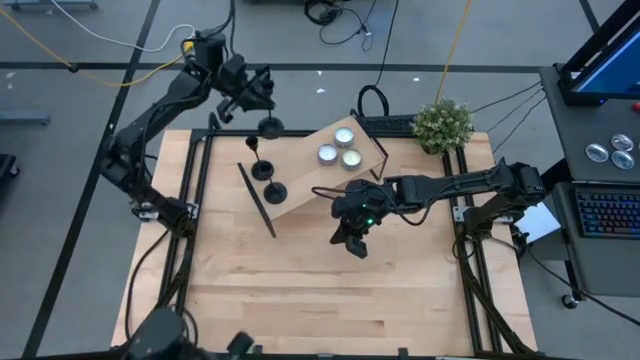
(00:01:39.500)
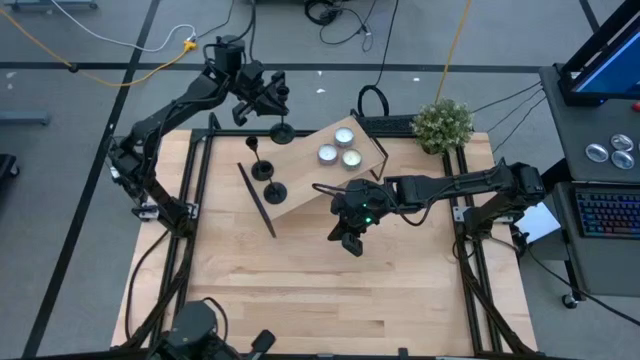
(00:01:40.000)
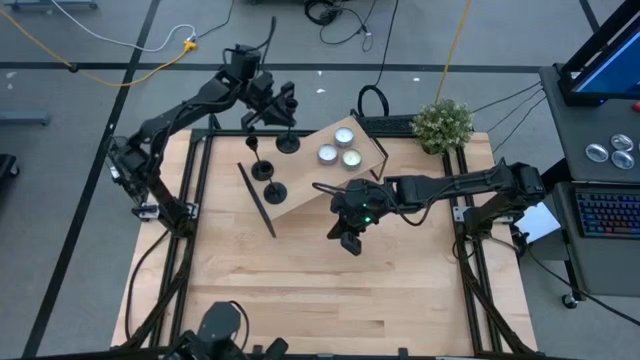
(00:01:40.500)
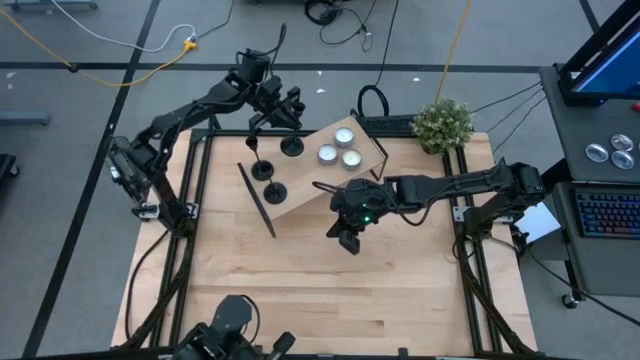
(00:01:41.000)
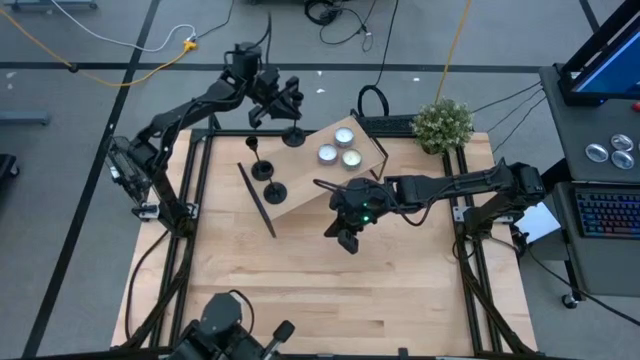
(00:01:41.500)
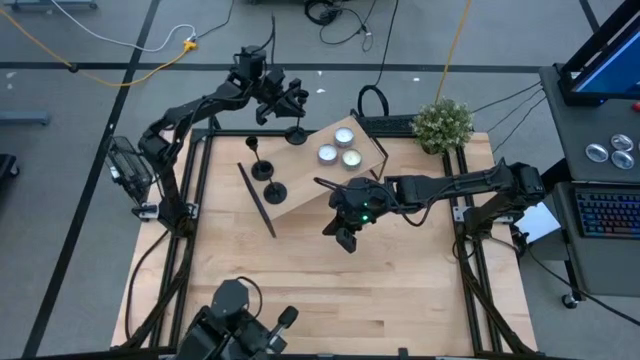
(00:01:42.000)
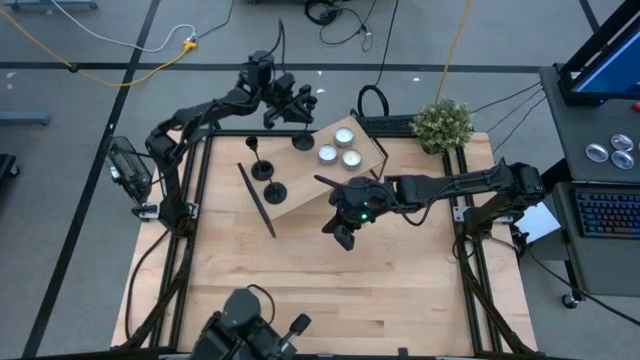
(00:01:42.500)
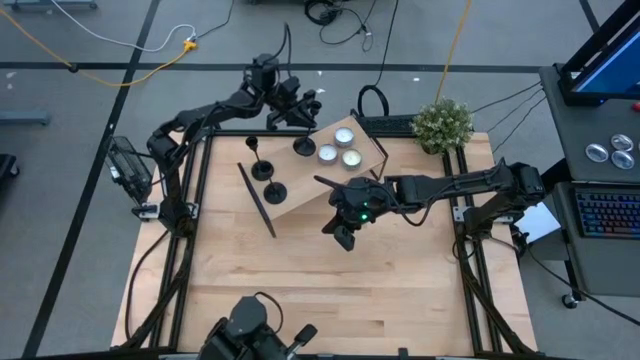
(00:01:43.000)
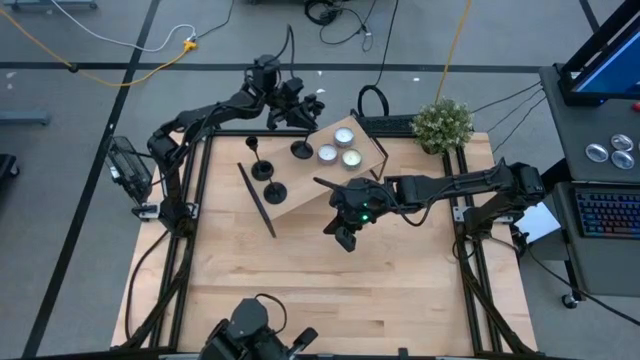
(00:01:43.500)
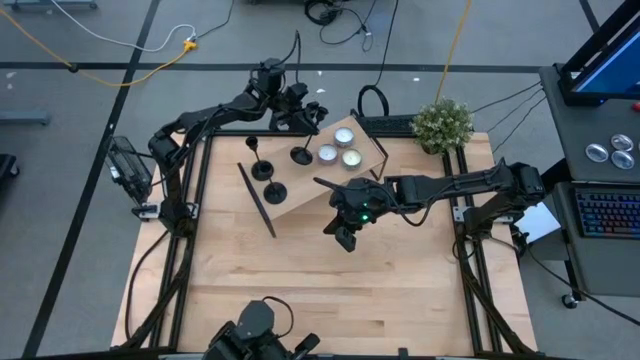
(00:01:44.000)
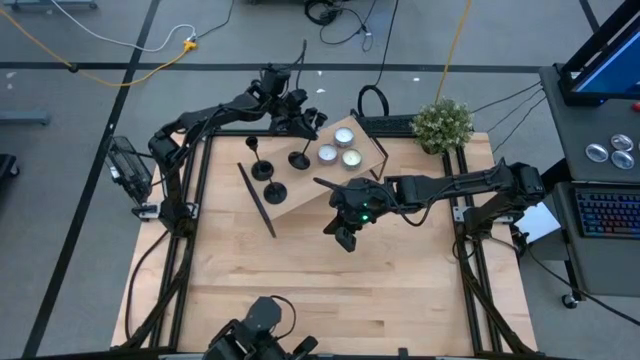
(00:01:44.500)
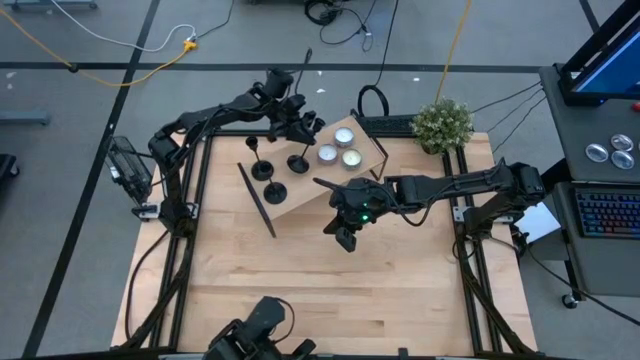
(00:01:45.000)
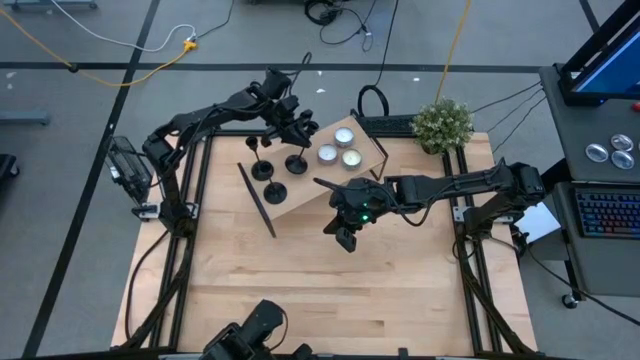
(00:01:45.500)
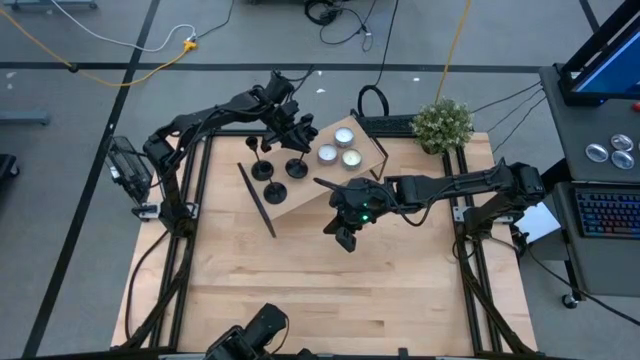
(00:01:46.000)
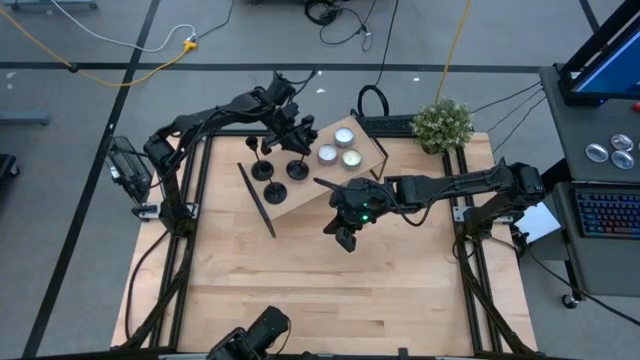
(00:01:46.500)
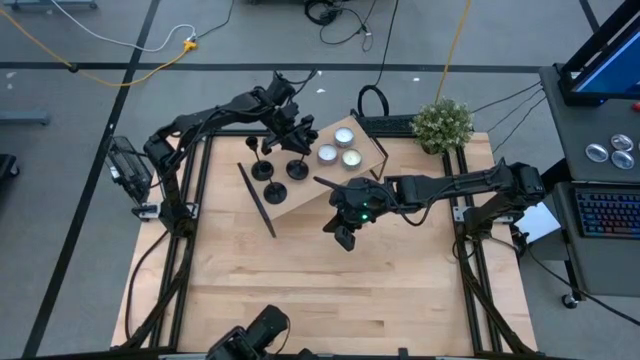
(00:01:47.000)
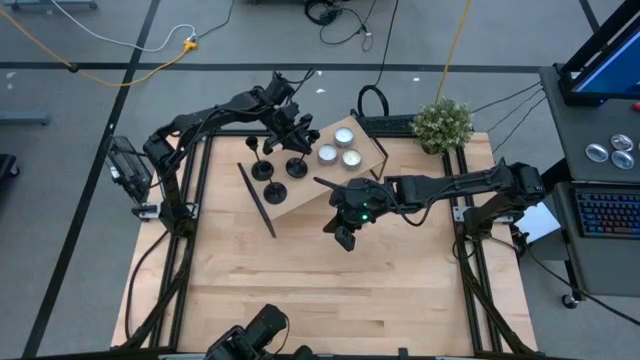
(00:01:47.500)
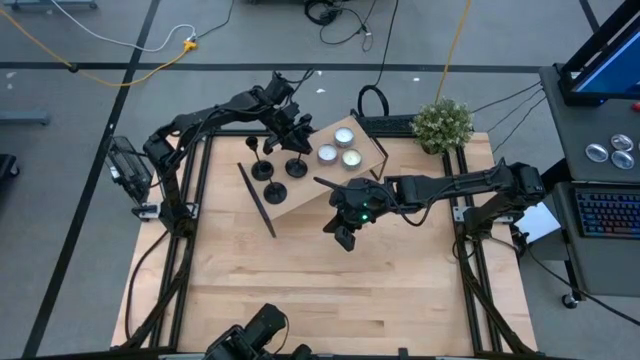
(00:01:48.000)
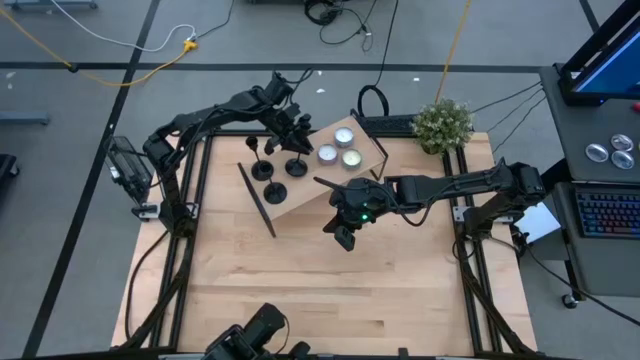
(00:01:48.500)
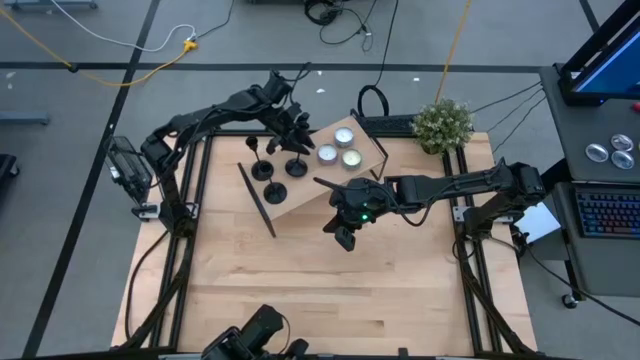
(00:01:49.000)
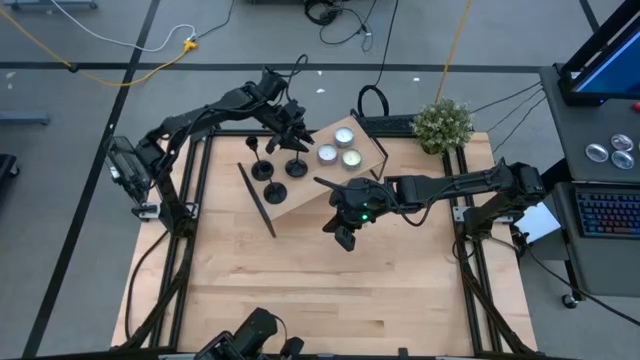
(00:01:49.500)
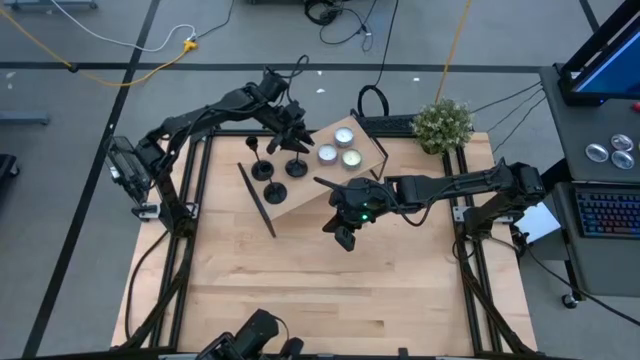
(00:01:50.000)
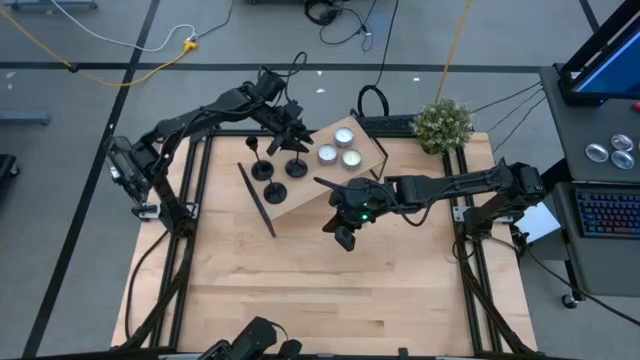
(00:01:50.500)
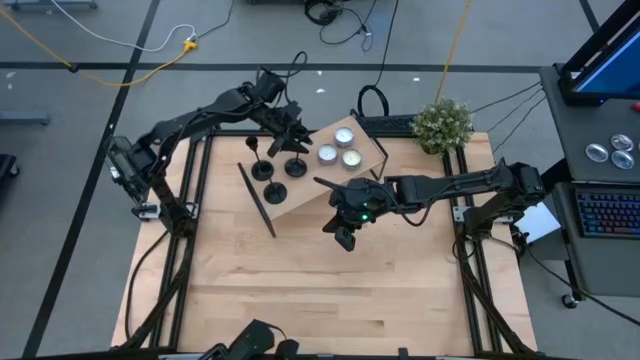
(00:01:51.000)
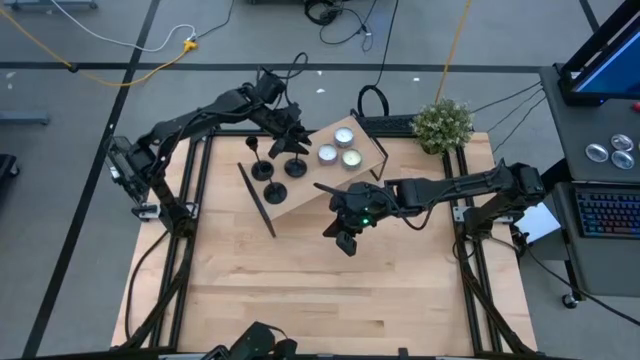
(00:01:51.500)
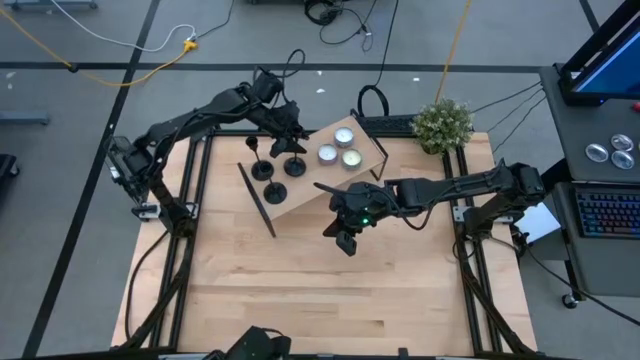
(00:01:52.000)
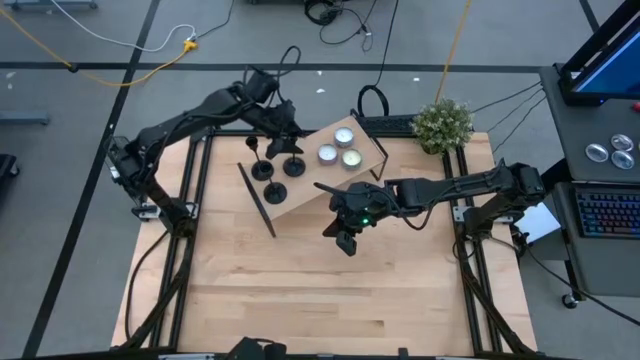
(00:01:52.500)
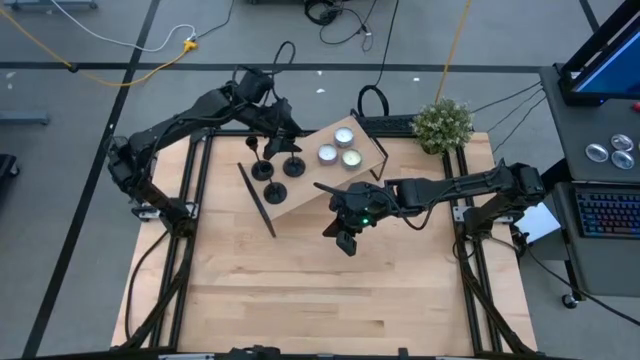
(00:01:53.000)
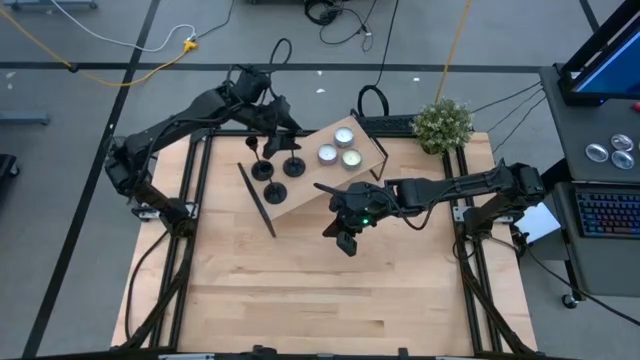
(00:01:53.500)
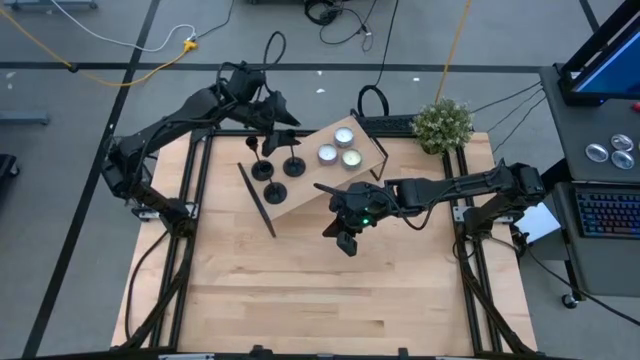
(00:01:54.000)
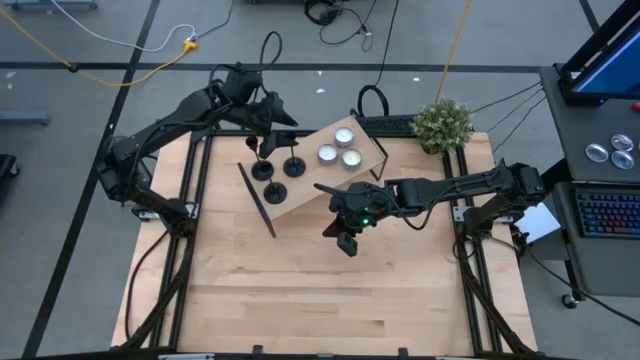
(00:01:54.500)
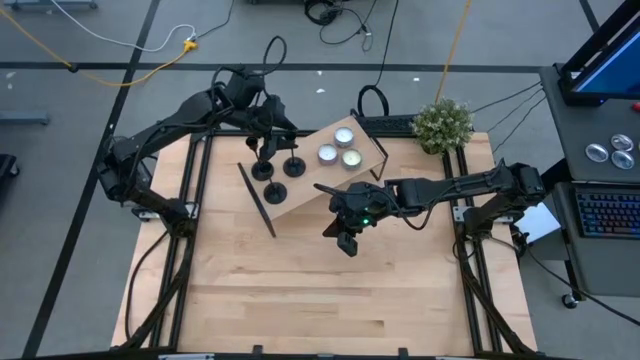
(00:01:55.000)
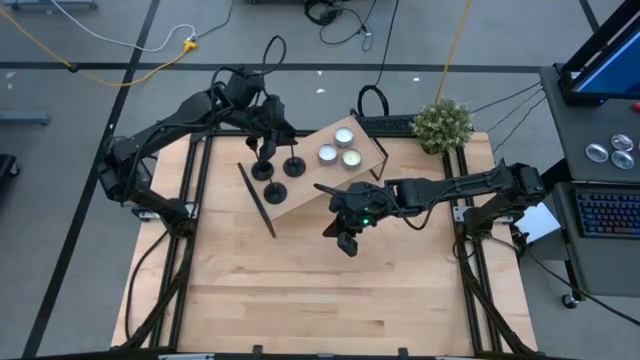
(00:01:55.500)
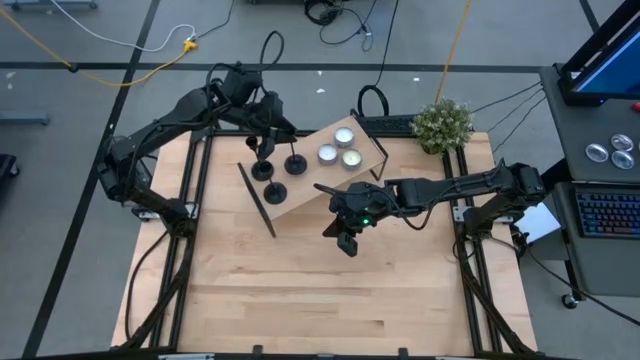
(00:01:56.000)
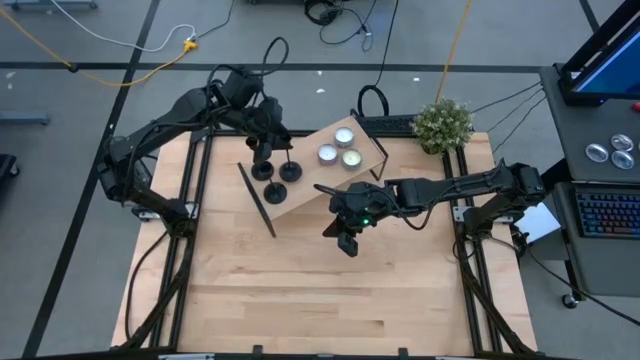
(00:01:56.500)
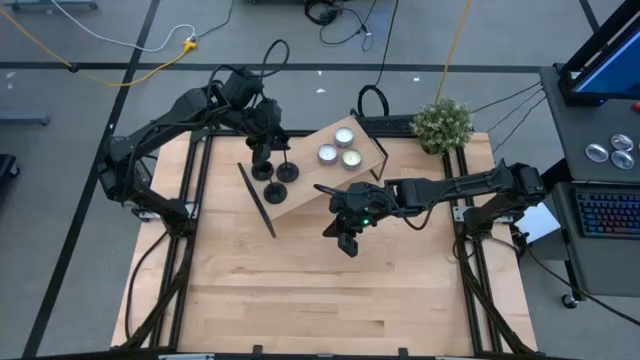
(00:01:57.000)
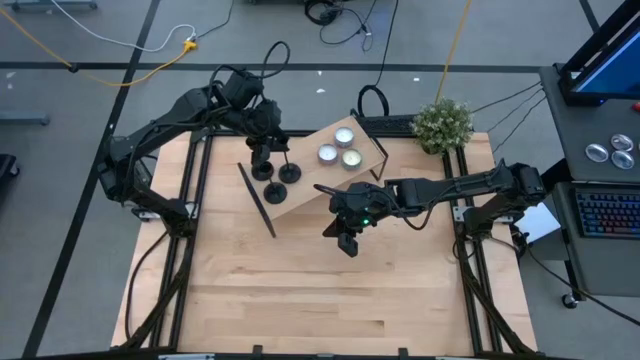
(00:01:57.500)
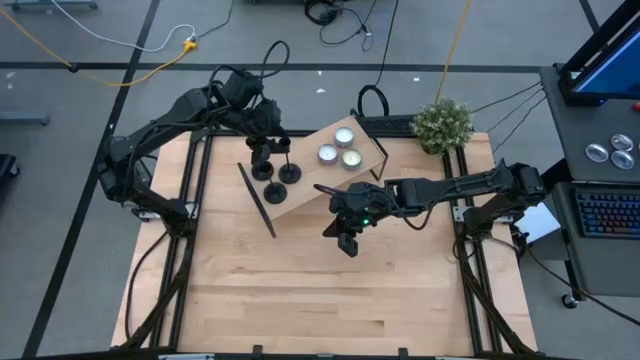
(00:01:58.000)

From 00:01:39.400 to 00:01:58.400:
Task: Pick & Place candle stick holders
Put the black candle holder on the shelf
